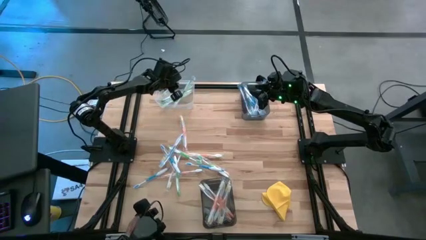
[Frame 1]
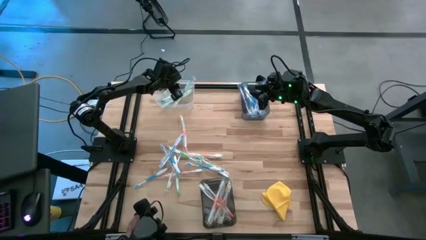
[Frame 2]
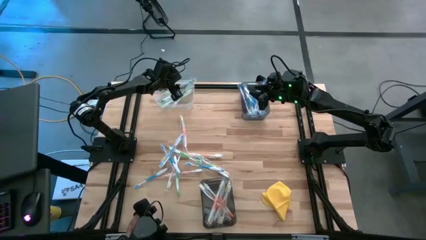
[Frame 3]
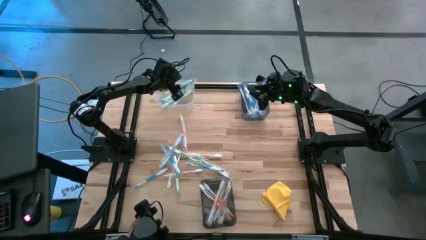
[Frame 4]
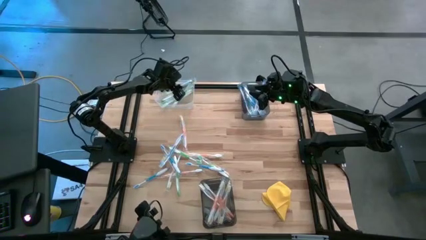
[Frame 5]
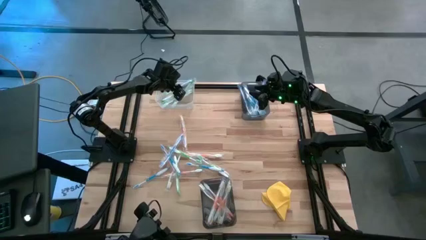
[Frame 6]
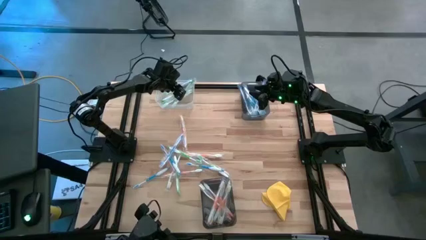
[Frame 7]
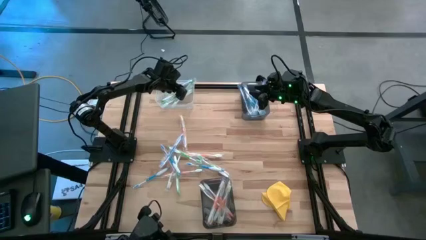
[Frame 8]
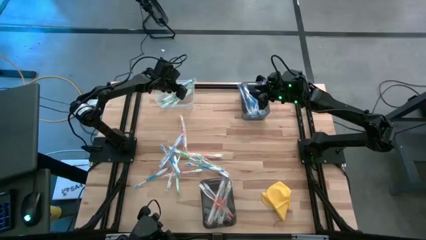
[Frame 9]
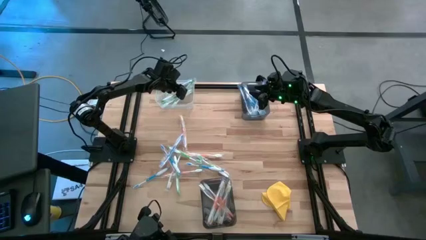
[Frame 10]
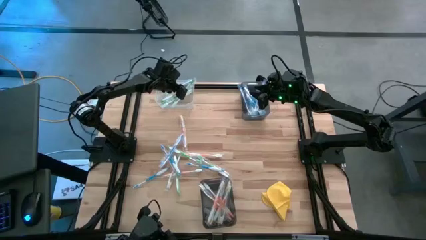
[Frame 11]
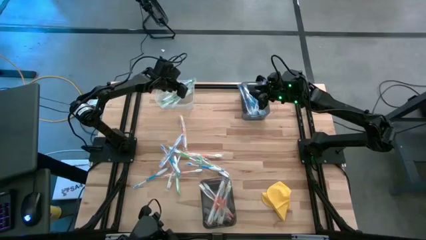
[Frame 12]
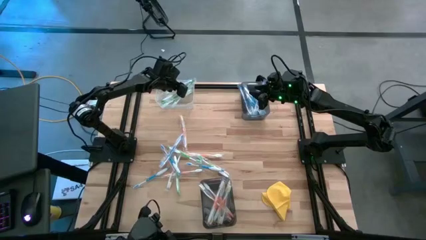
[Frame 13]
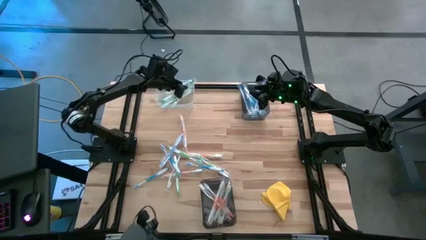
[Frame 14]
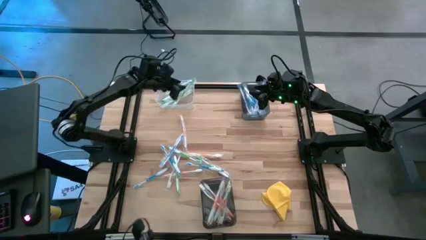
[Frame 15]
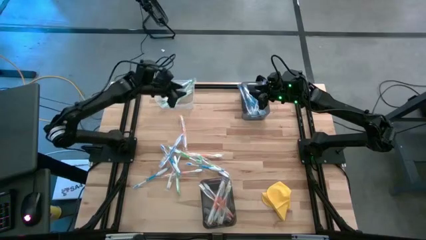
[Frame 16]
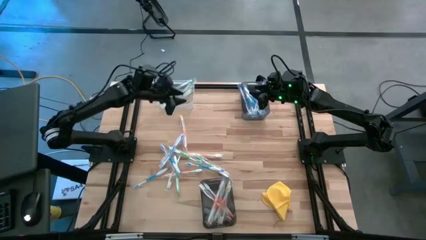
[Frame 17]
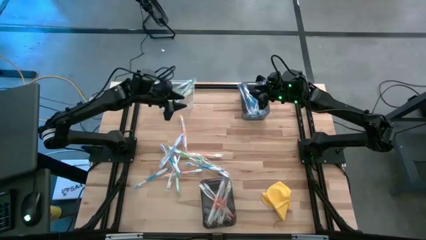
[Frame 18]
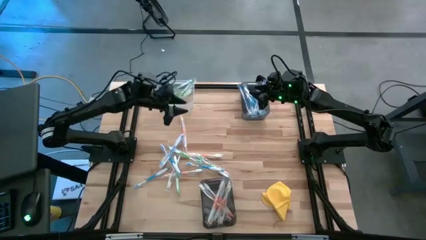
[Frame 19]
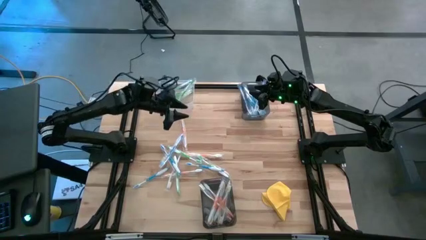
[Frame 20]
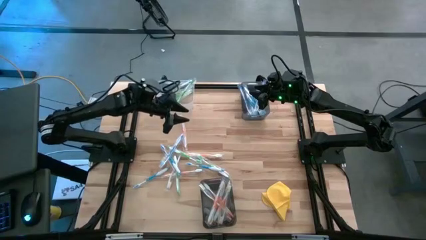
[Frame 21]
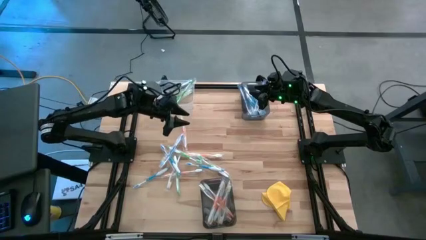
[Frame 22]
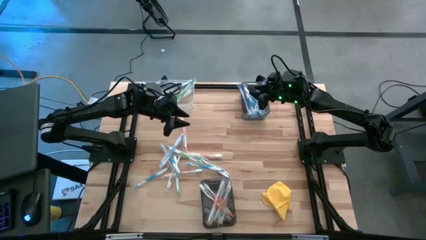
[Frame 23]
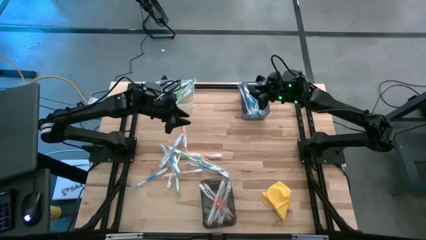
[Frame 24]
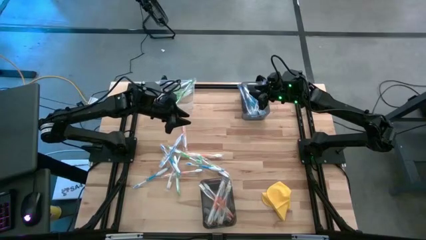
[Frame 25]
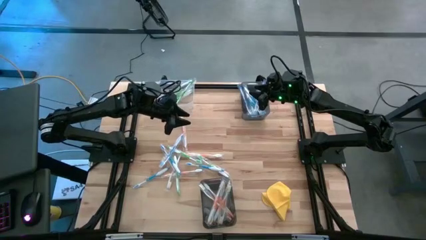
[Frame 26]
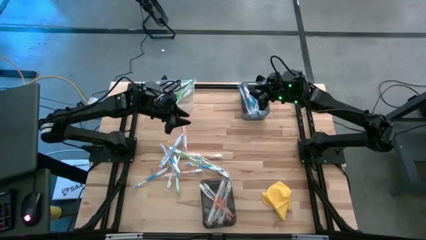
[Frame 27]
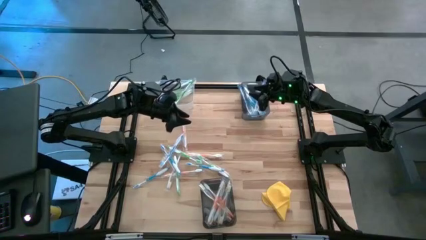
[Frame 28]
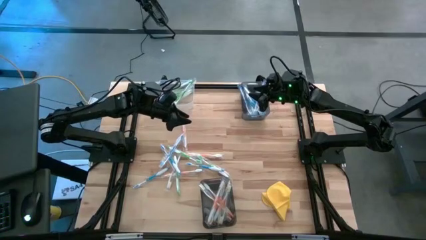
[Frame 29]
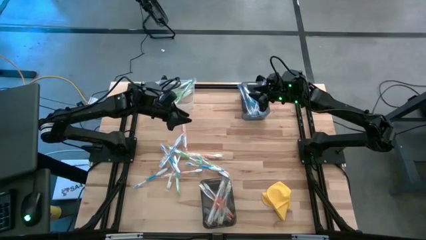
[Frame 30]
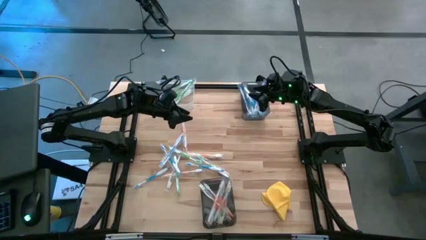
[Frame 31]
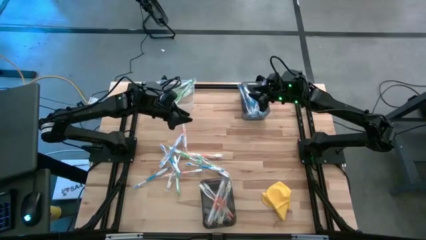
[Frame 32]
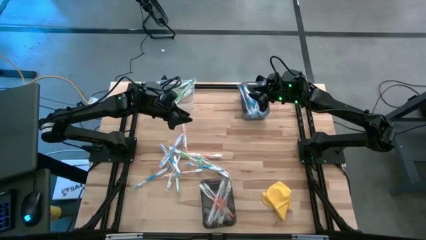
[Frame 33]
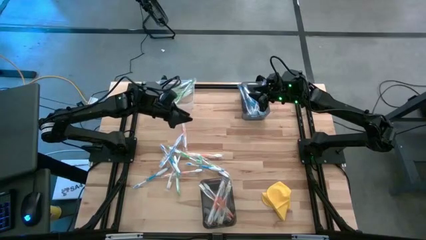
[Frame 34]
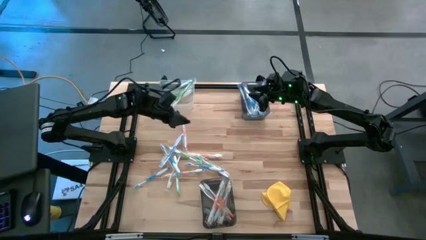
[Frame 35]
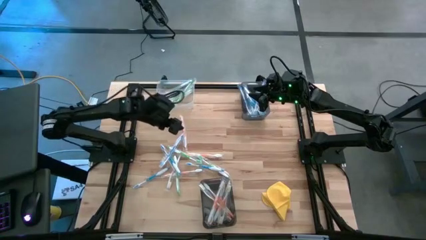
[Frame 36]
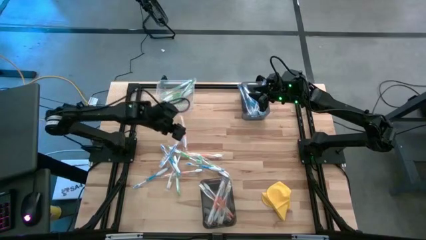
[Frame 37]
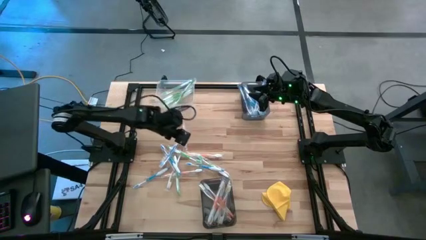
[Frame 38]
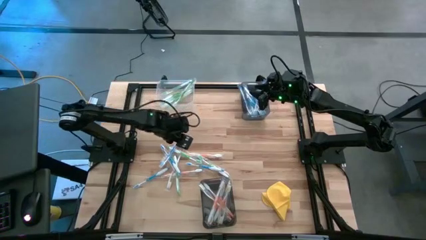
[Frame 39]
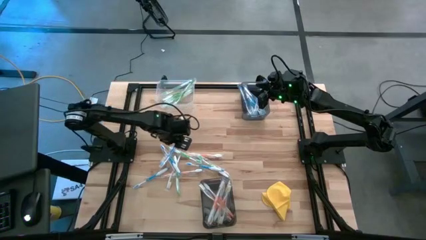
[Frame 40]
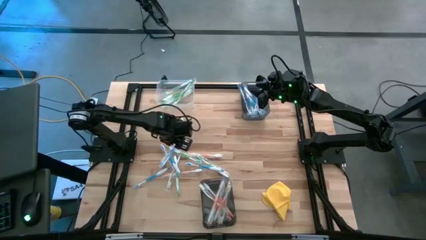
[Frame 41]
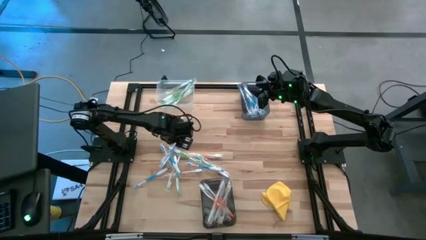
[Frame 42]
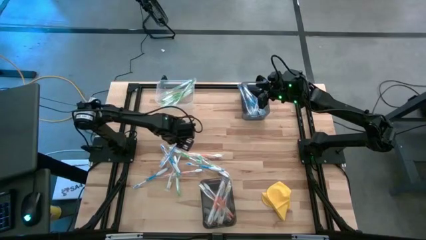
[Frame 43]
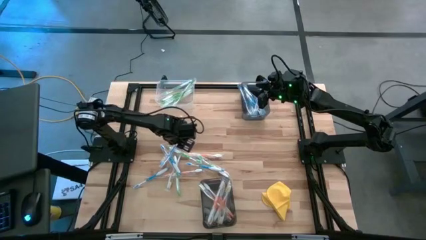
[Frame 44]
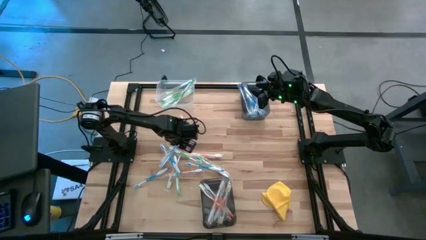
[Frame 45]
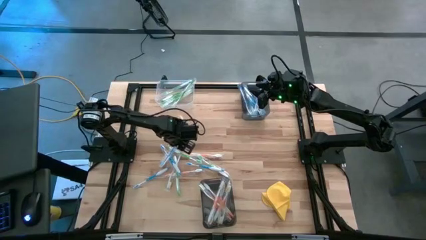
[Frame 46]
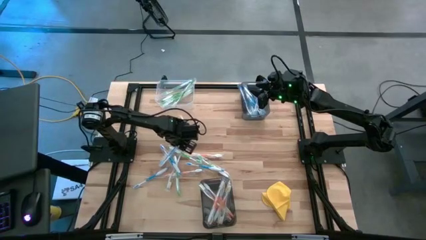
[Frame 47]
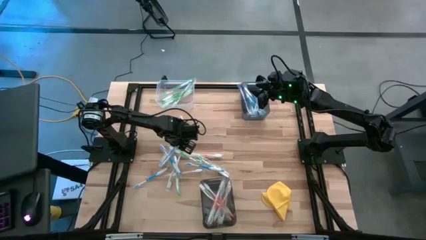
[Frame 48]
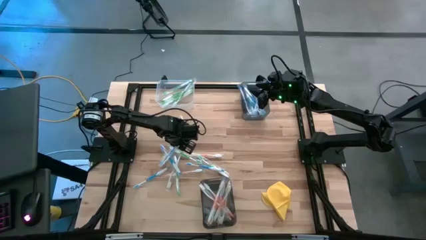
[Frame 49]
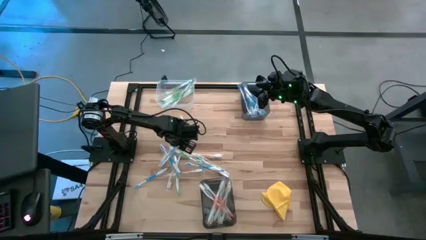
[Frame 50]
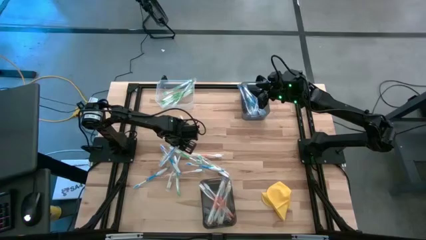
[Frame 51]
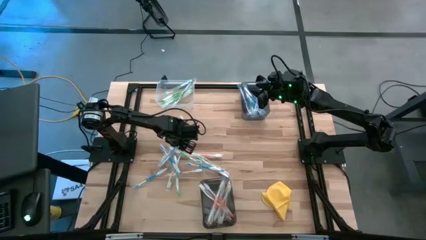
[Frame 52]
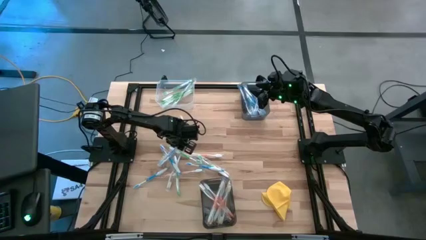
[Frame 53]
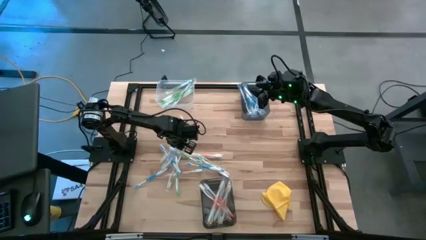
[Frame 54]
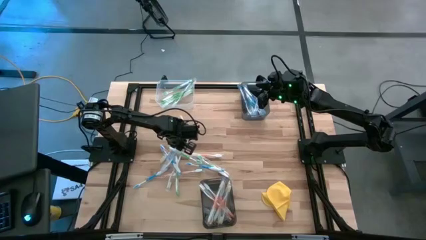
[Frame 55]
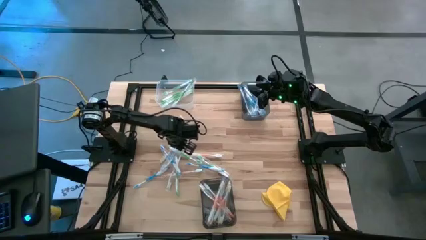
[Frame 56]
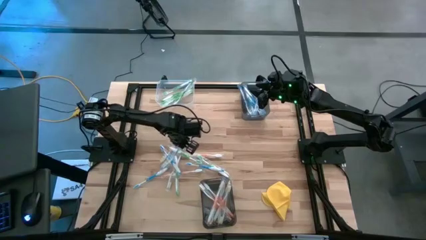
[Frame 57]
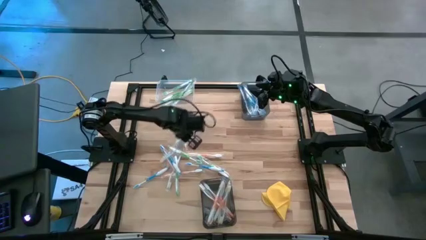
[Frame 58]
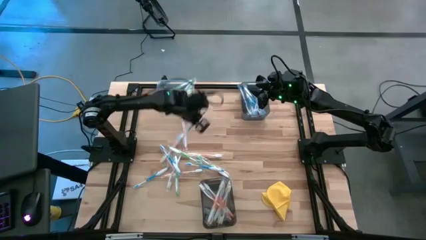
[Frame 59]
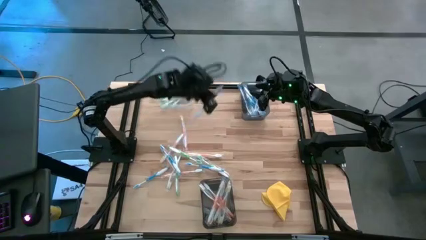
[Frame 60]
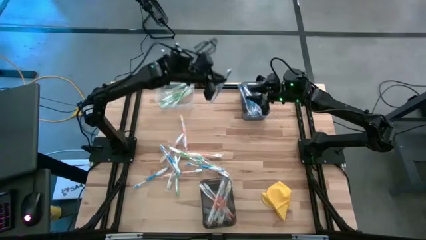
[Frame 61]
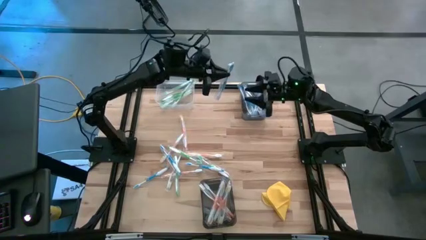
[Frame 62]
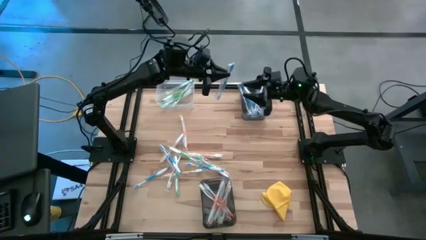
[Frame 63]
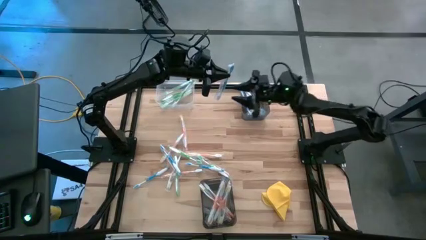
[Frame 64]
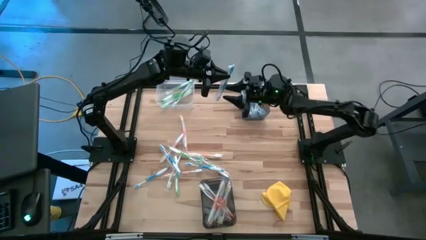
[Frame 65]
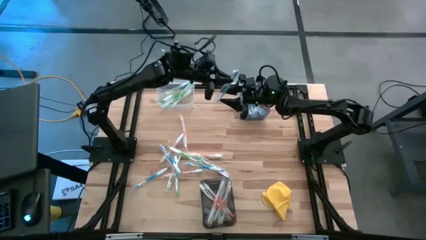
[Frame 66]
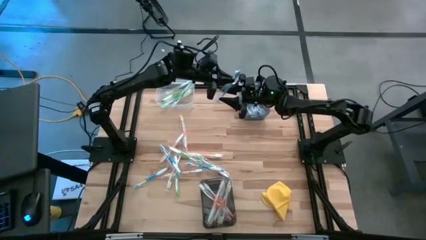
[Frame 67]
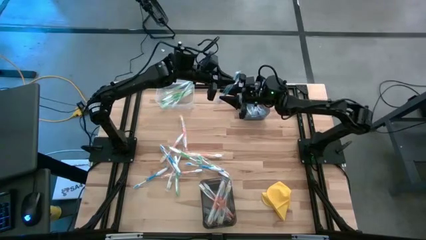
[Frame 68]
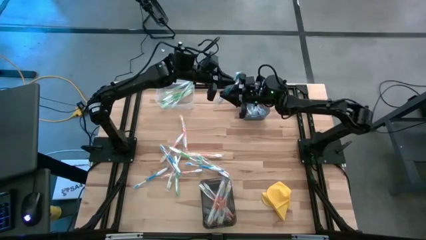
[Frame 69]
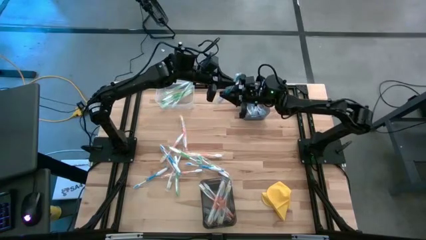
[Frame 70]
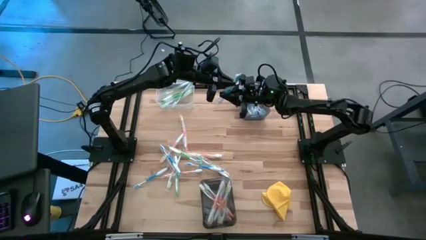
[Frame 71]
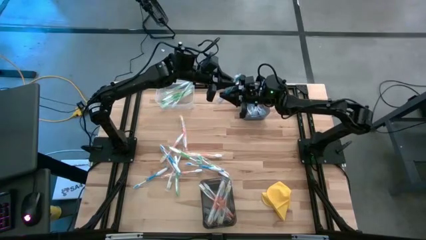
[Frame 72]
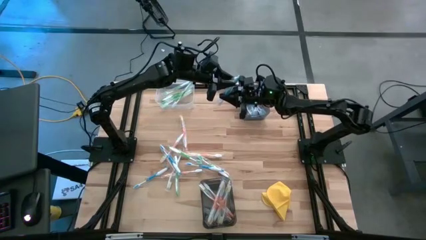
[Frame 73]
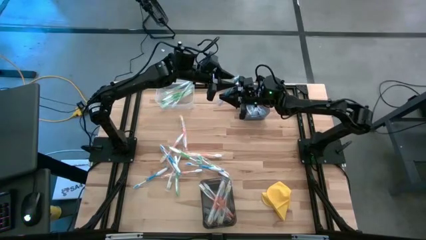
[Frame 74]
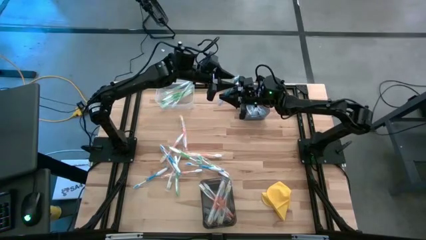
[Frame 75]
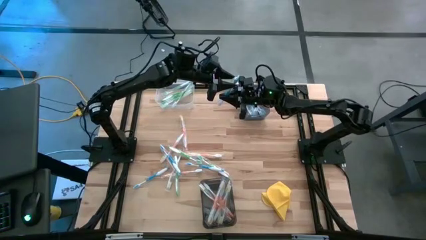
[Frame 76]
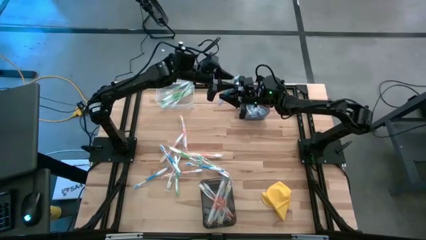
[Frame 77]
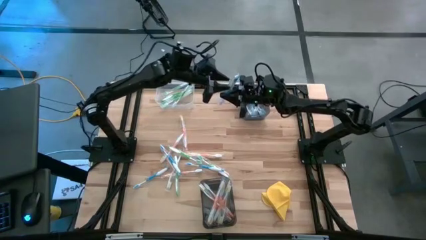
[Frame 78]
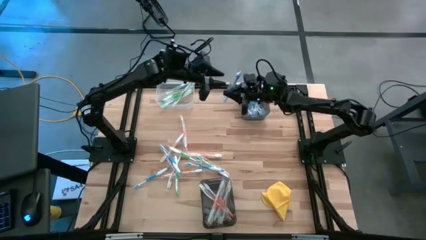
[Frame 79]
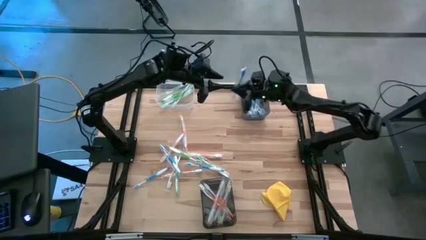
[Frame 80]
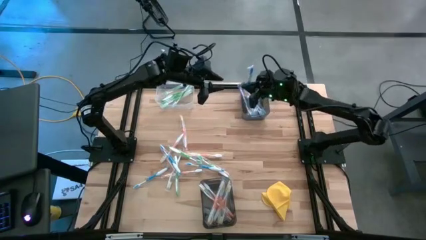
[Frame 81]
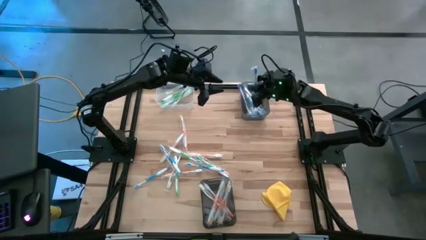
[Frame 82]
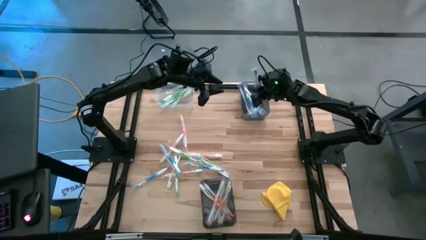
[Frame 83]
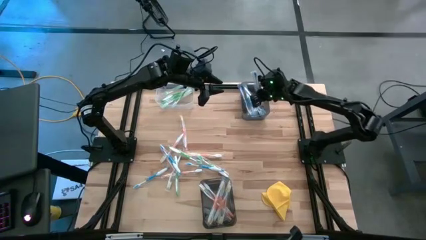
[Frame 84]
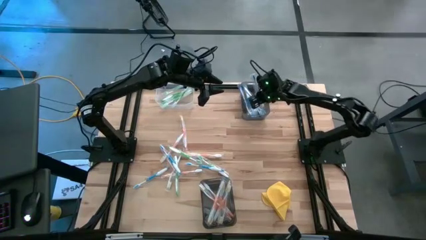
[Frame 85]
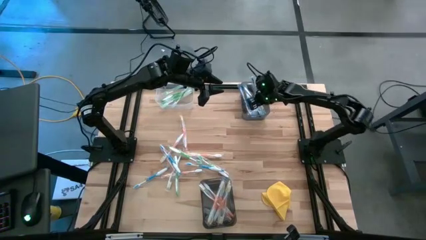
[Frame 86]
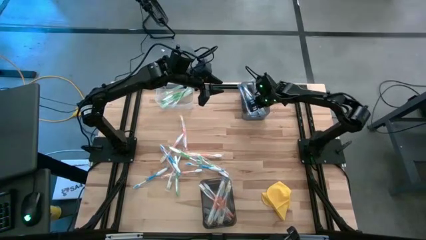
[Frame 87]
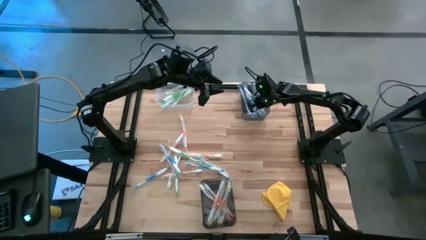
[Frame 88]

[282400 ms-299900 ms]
Task: Pick & Place Toothbrushes
Put the blue toothbrush into the top black bin
